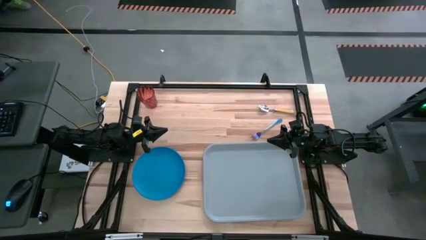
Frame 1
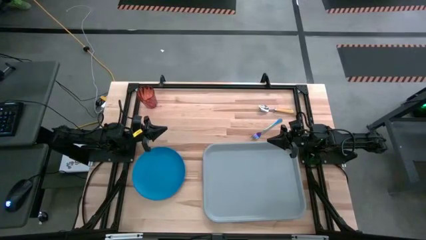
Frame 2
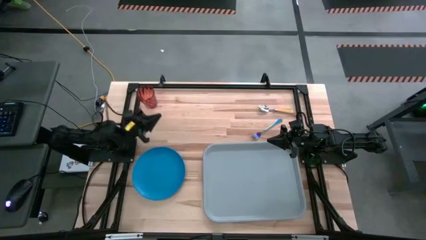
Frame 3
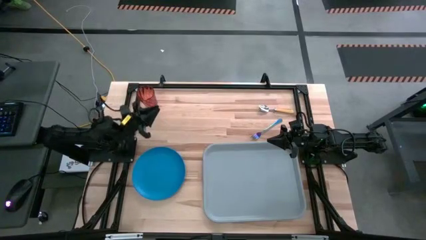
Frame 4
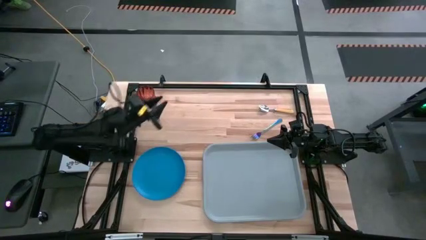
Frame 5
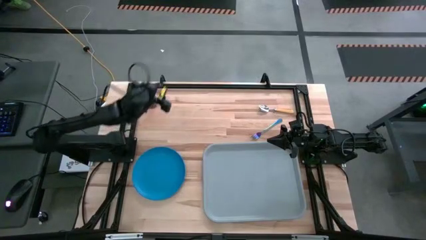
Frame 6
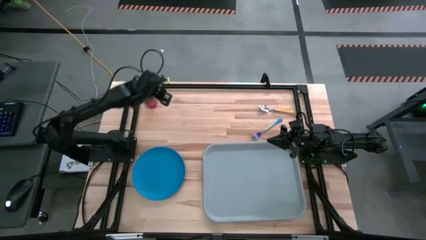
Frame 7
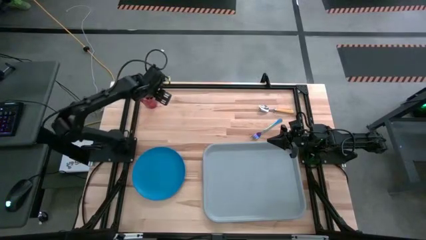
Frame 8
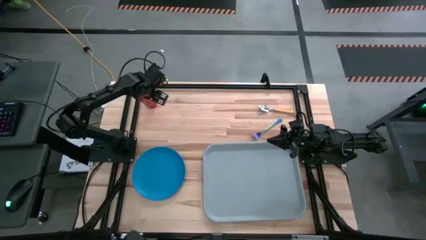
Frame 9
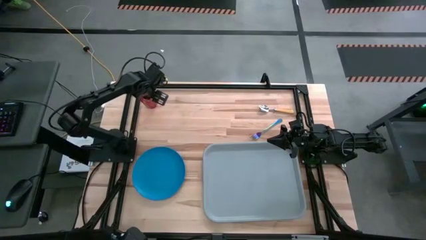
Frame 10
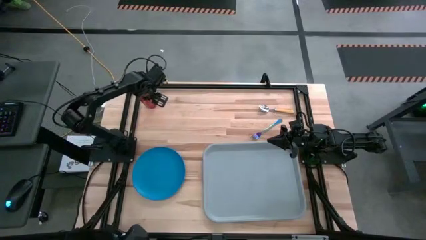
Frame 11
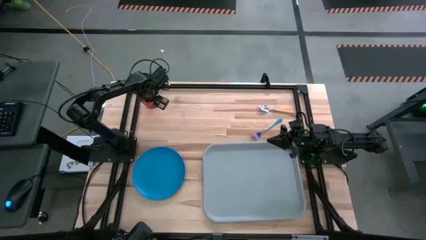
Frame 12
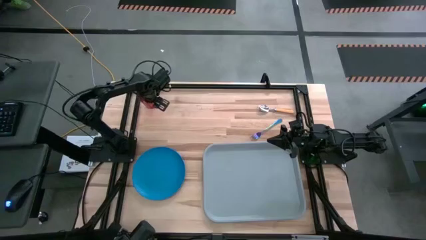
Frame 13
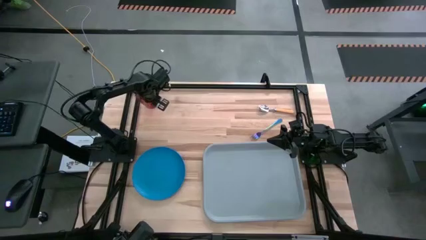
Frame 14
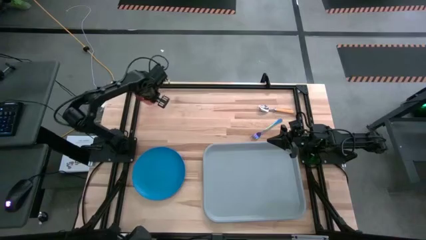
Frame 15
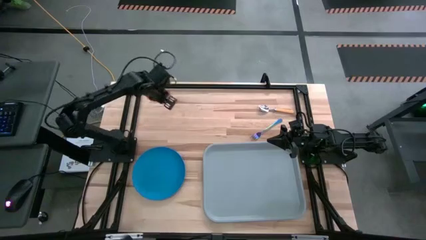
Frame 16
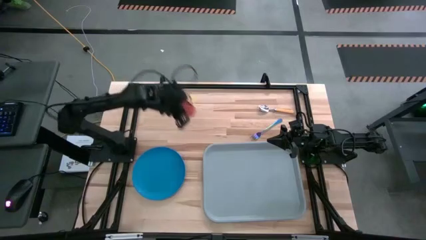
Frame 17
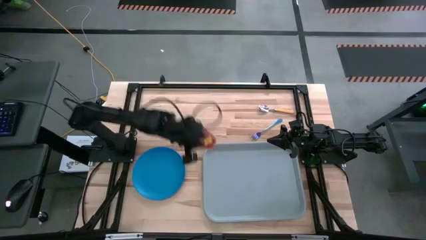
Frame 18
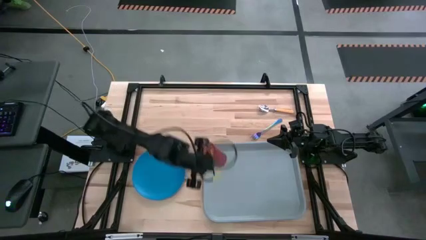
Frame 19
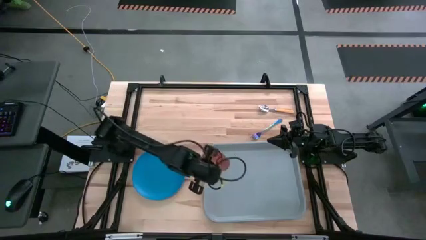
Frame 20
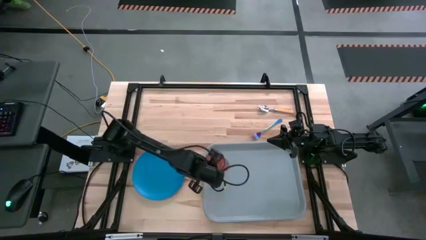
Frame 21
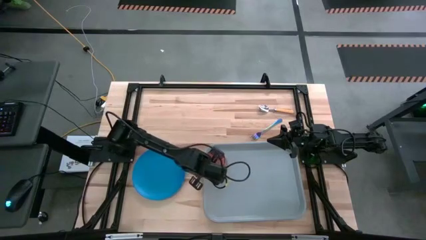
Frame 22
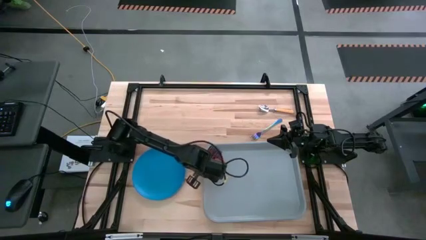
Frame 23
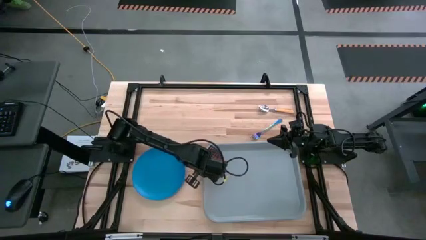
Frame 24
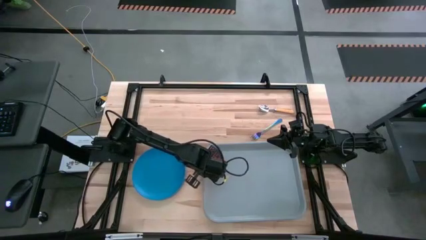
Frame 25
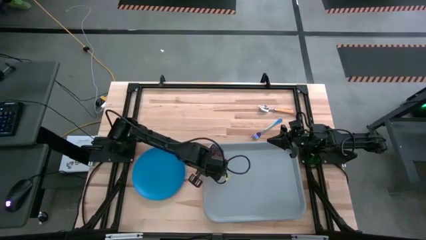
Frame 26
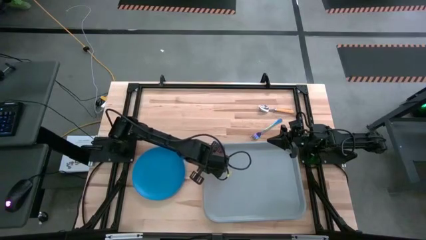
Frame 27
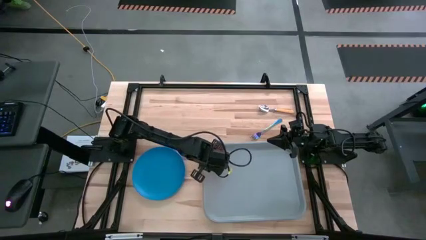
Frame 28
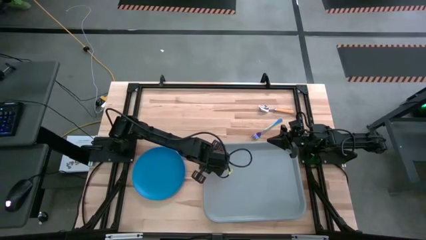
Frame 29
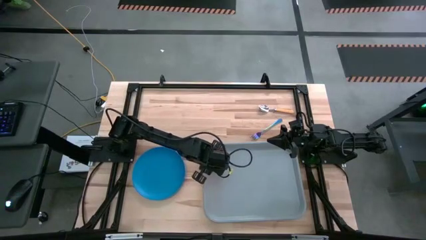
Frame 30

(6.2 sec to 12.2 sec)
Task: Pick and place plate/cup/fork/spoon on tray
Put the red cup on the gray tray

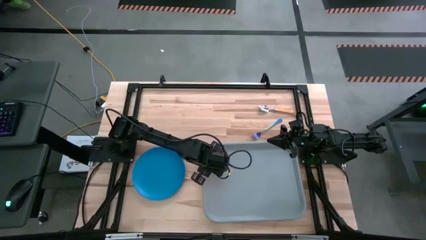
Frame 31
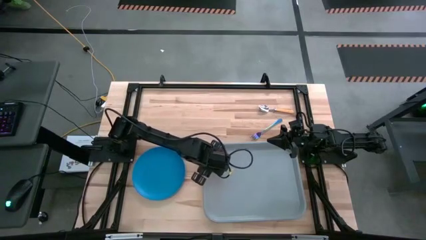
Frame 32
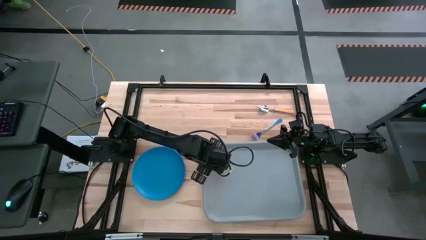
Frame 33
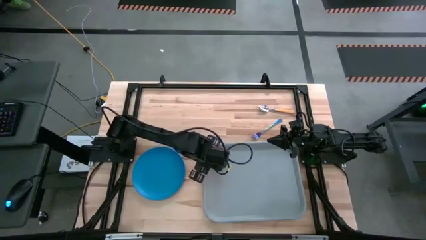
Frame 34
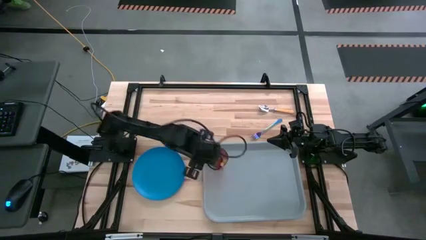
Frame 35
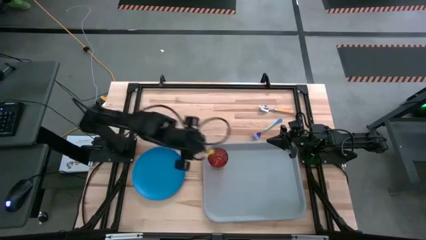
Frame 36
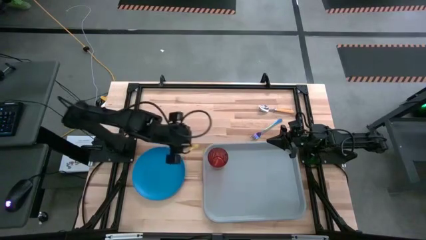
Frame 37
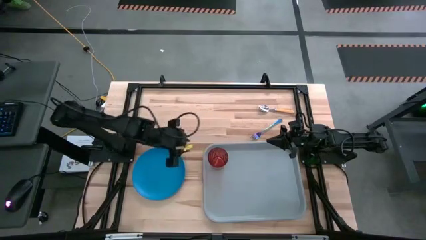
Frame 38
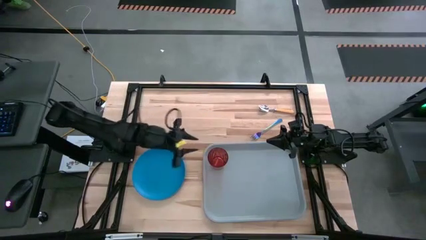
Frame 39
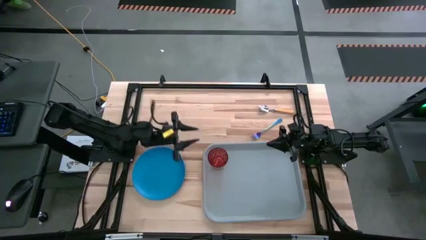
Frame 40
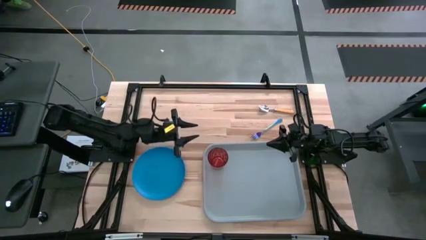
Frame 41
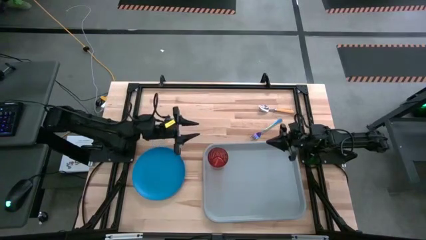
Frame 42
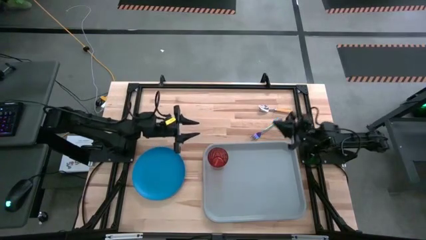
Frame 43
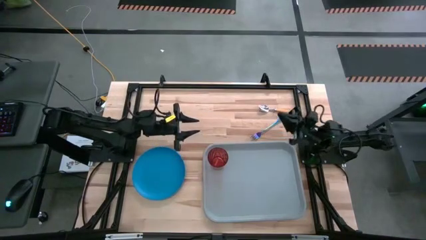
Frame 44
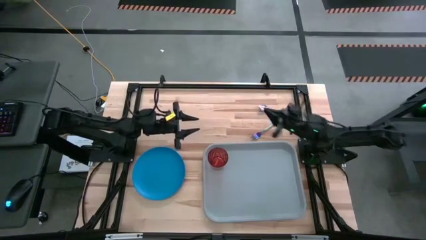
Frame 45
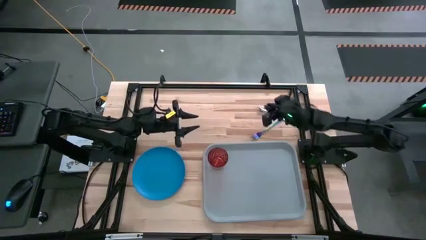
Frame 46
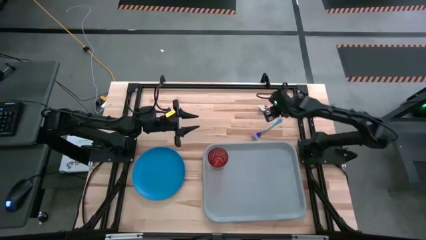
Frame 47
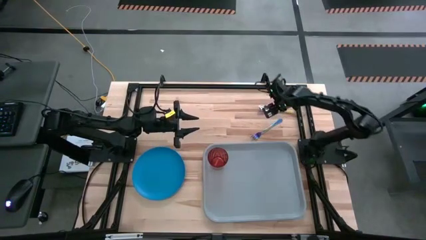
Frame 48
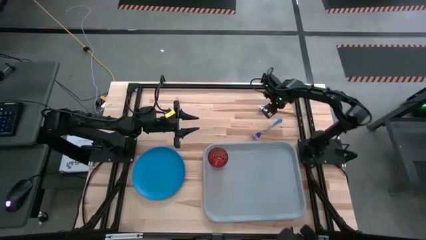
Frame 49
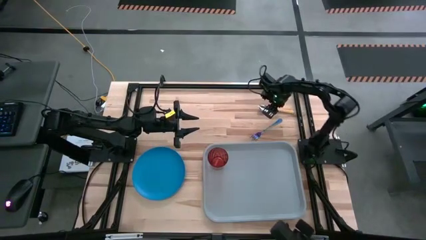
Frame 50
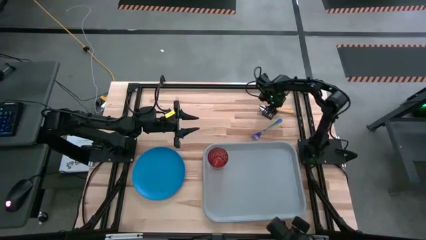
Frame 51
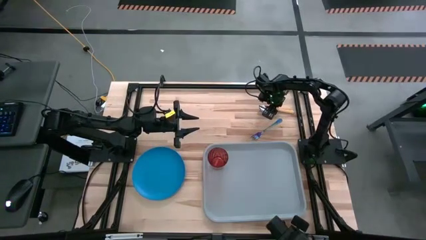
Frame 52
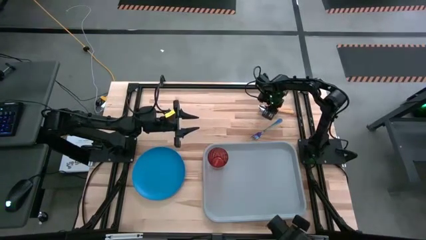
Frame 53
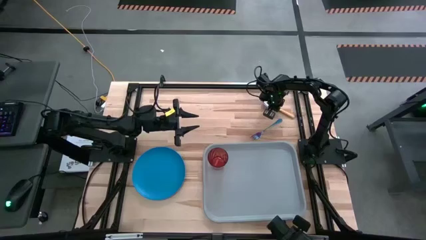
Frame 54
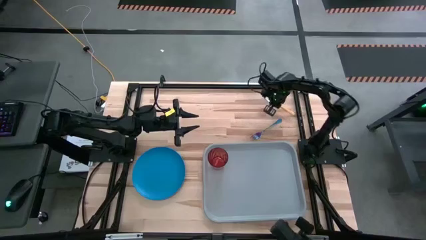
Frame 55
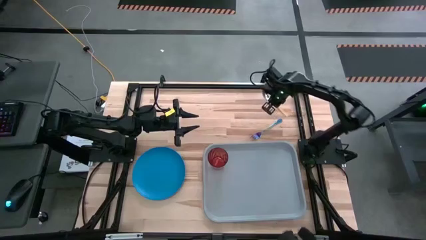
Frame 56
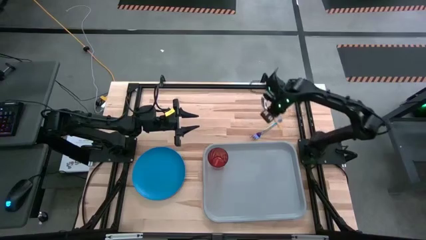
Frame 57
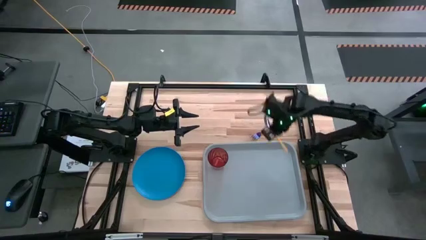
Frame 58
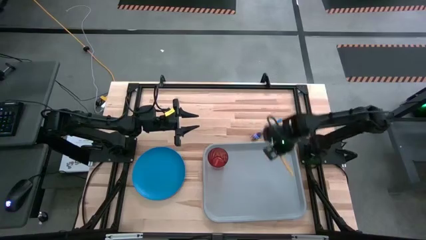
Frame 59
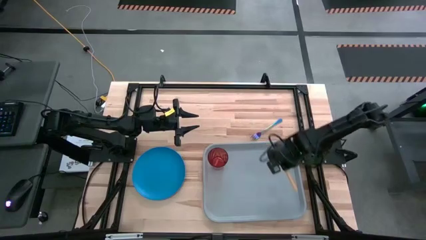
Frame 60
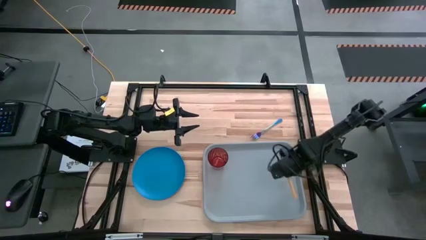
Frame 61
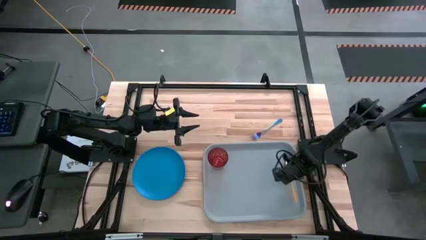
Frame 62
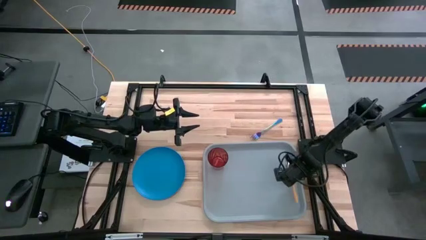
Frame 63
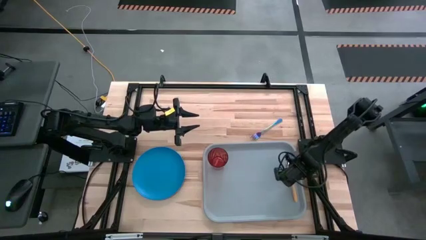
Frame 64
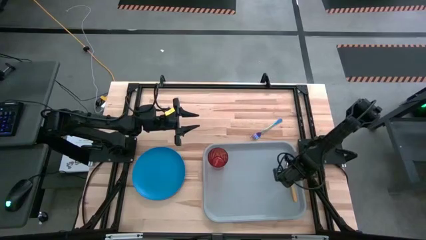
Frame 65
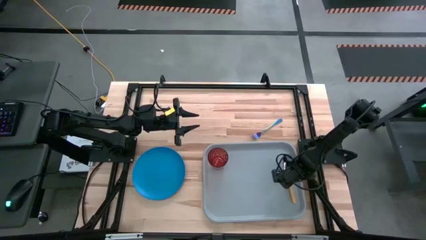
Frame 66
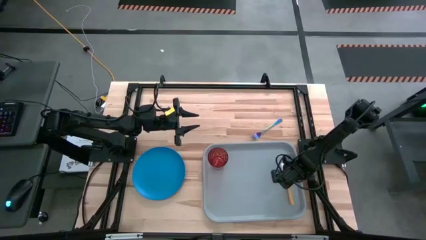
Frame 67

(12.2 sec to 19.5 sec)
Put the yellow spoon on the gray tray

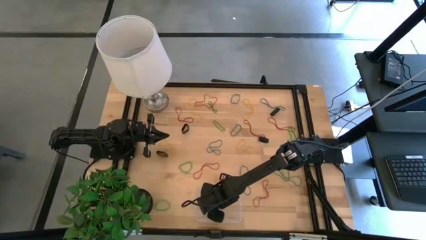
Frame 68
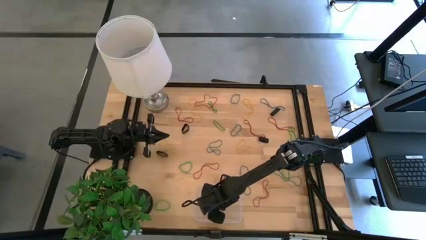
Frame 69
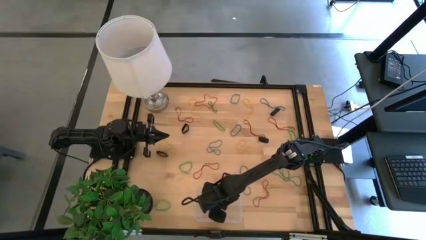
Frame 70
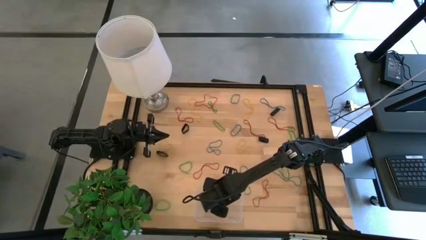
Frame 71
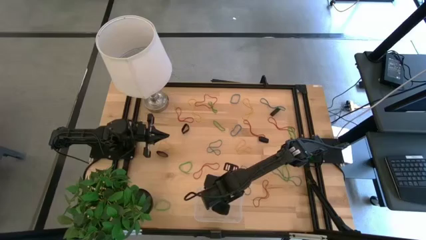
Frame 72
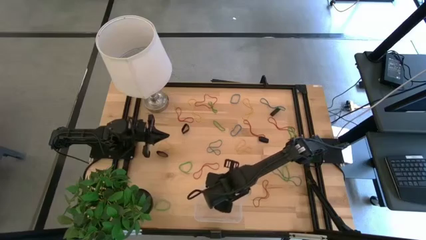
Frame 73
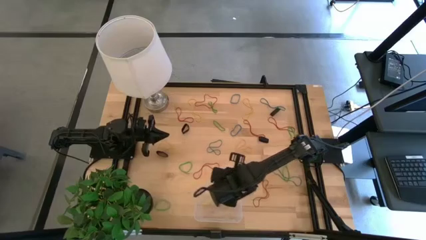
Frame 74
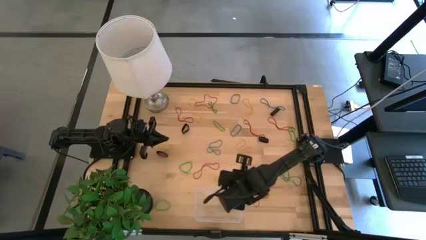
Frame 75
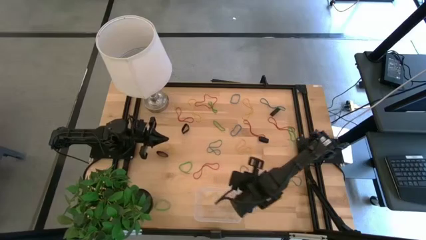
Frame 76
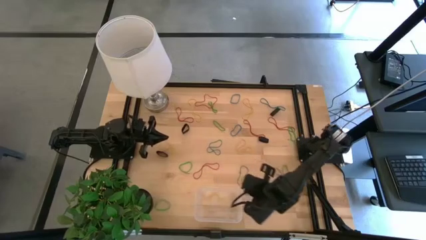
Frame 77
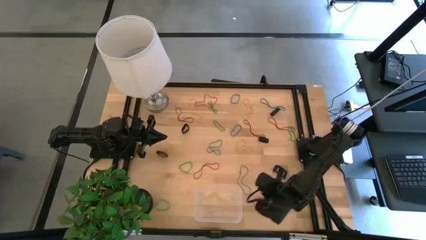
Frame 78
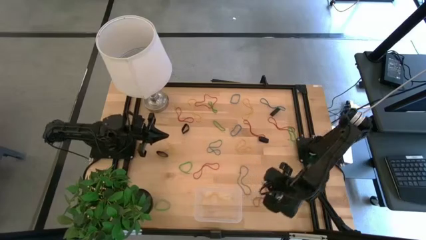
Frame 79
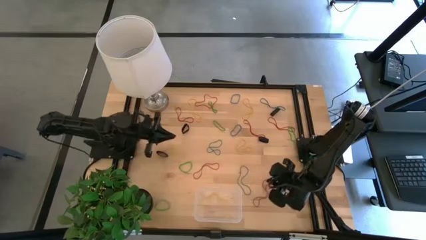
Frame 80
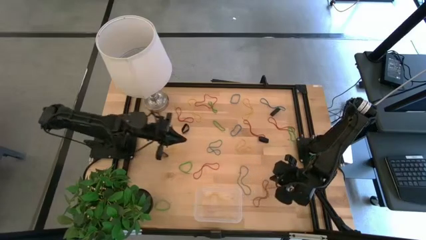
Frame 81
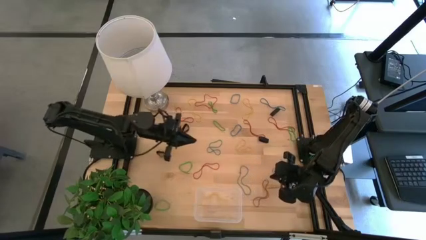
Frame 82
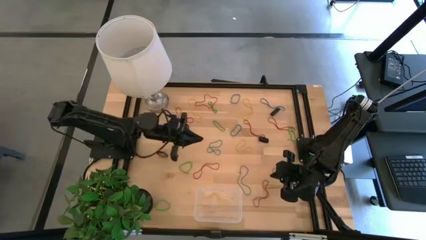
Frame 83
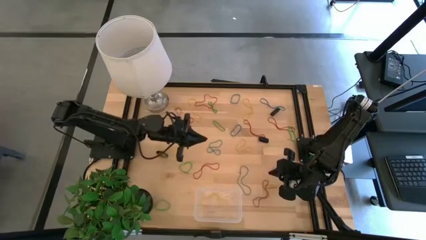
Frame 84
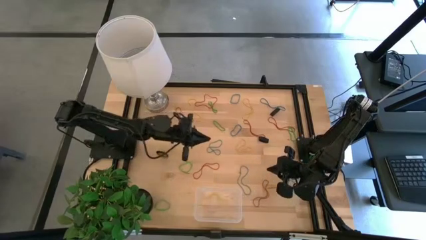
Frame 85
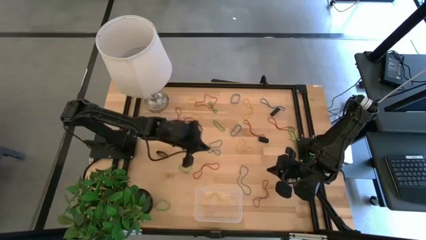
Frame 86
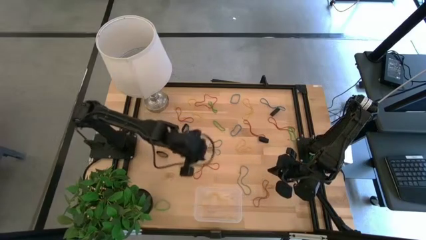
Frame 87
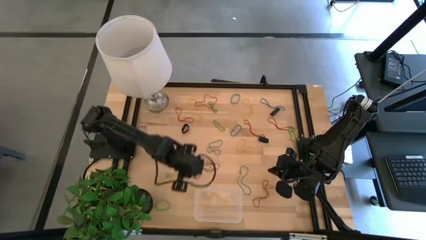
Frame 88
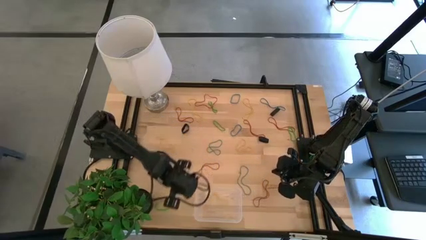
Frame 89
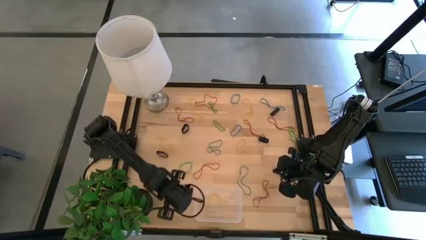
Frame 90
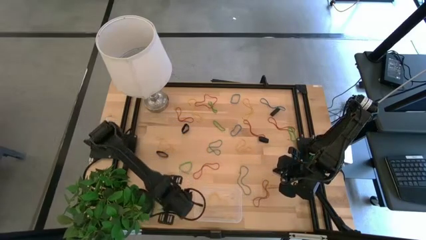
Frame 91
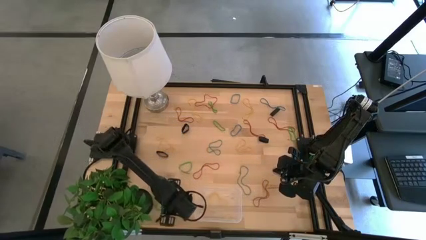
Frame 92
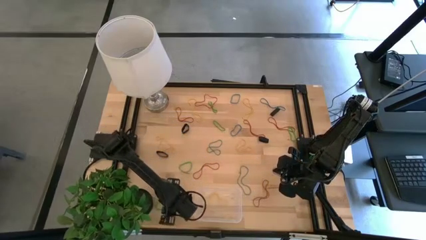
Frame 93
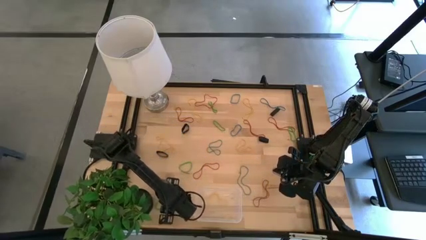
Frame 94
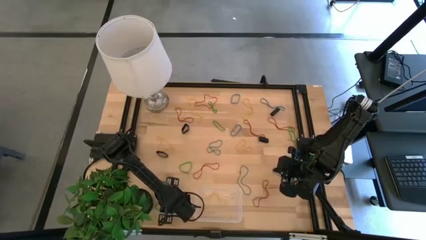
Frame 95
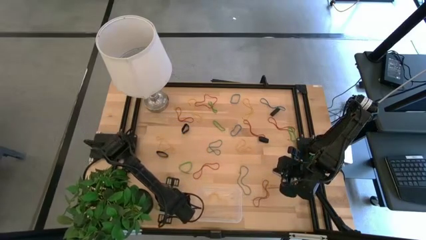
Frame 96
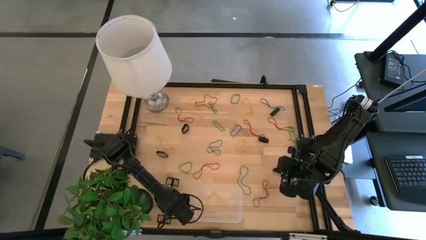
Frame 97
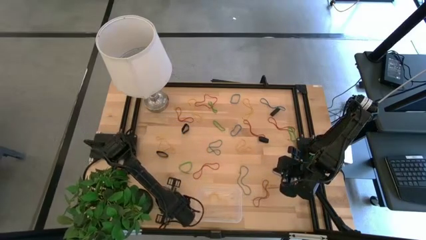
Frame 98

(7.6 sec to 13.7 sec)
Task: Pick and place rubber bands into bin
Put the green rubber band into the transparent bin
